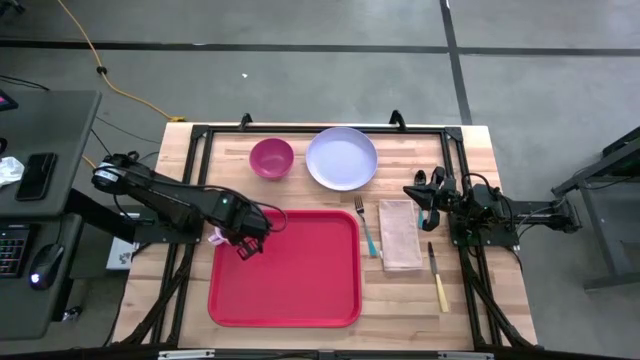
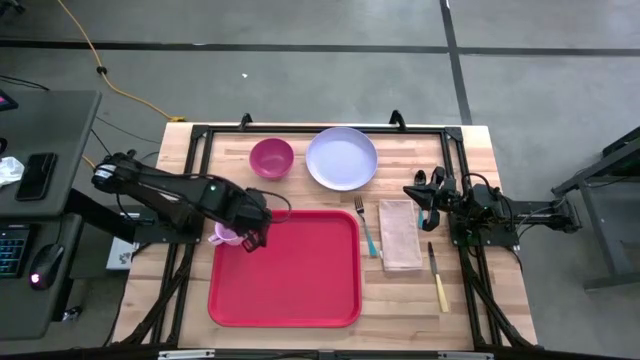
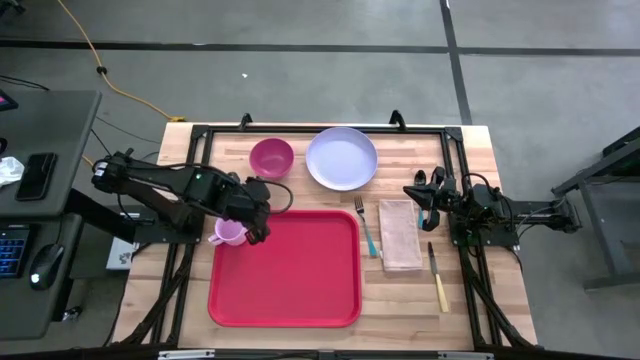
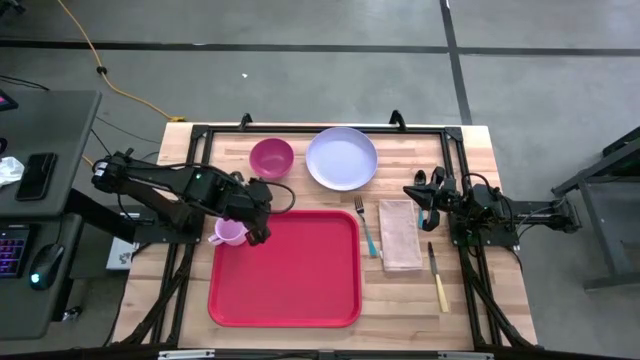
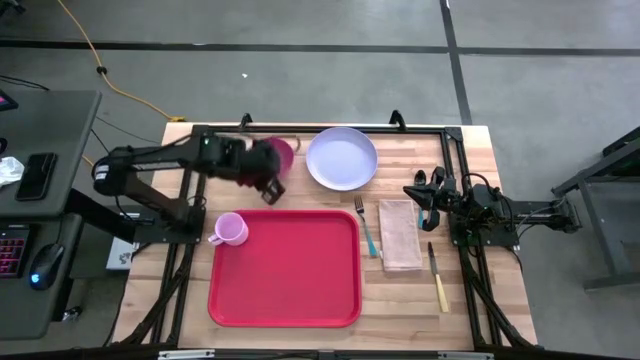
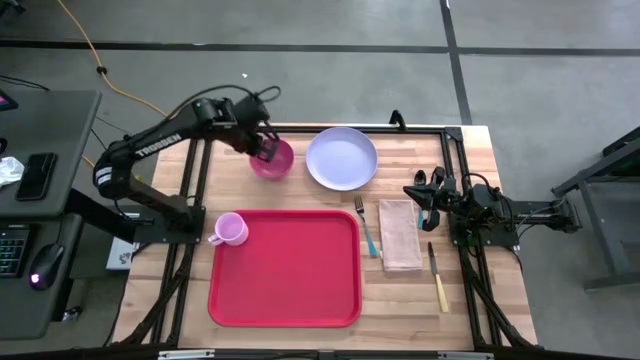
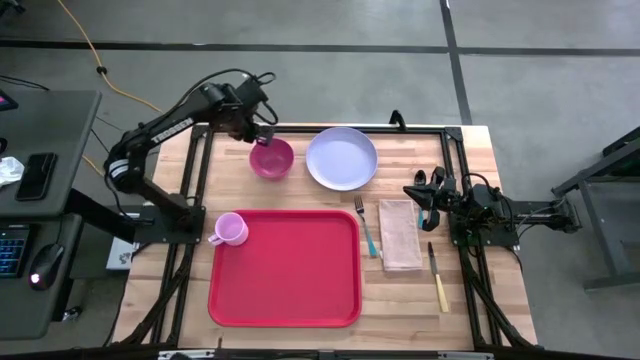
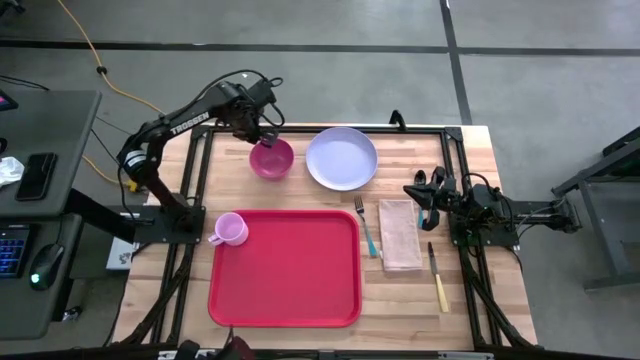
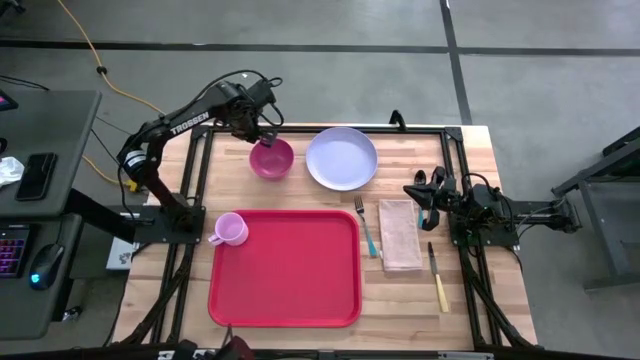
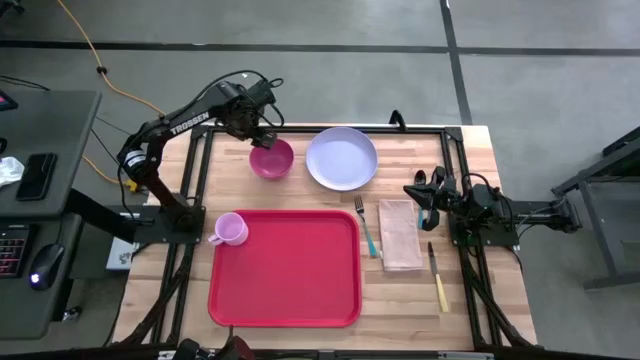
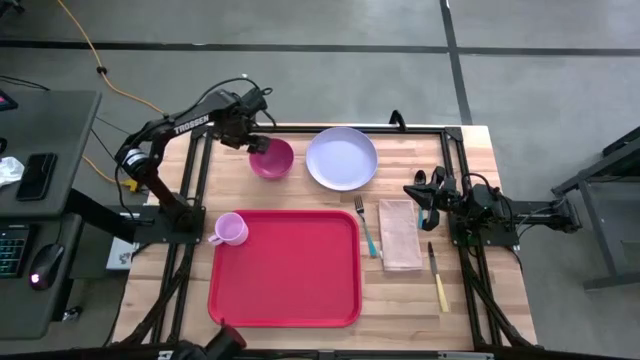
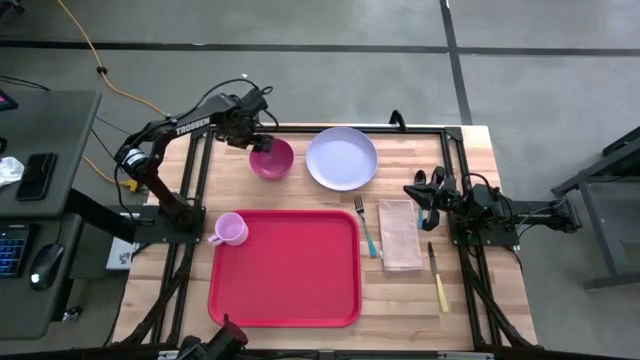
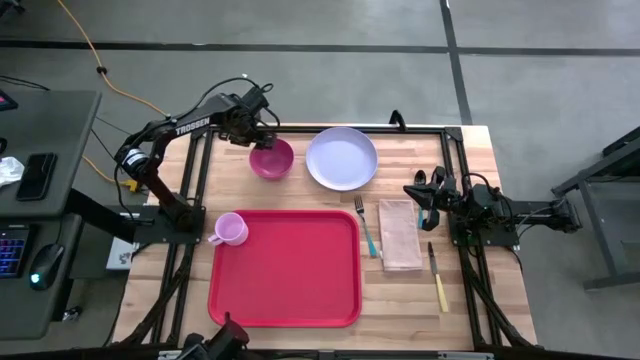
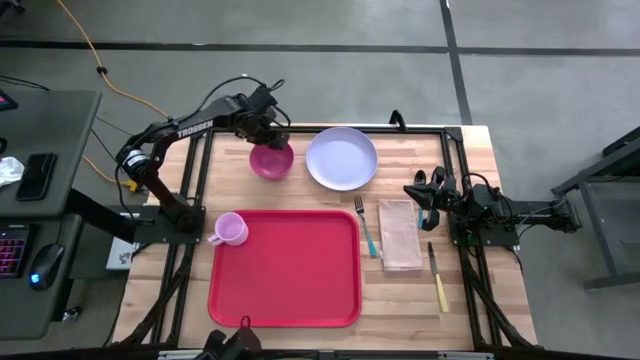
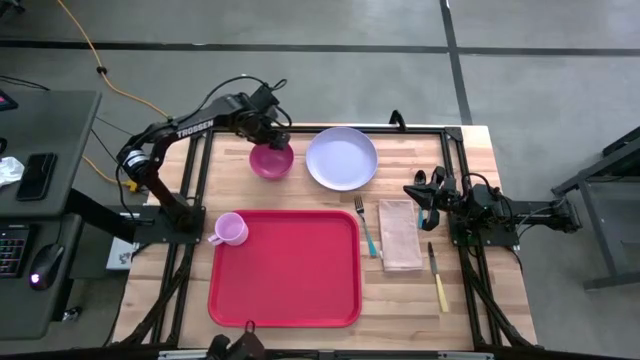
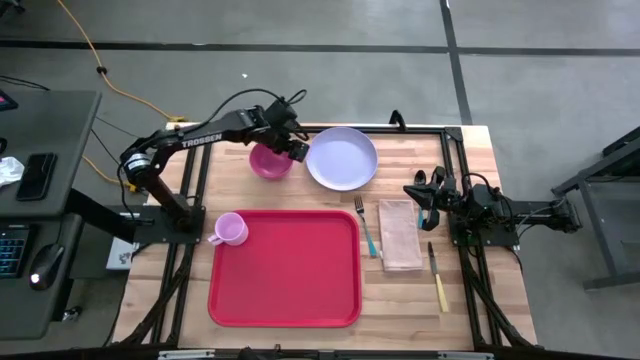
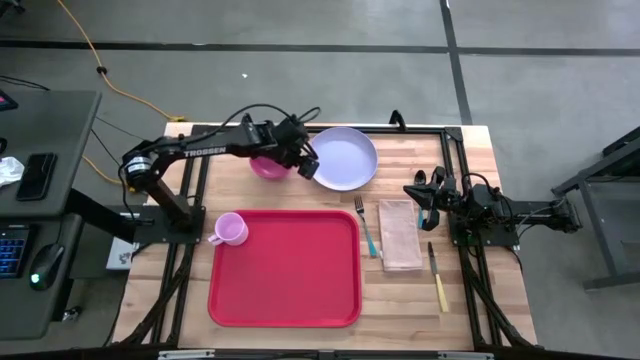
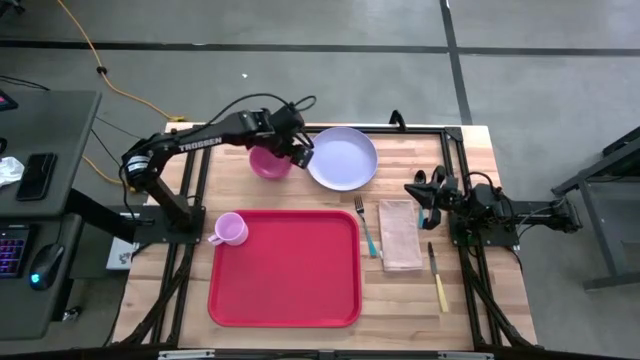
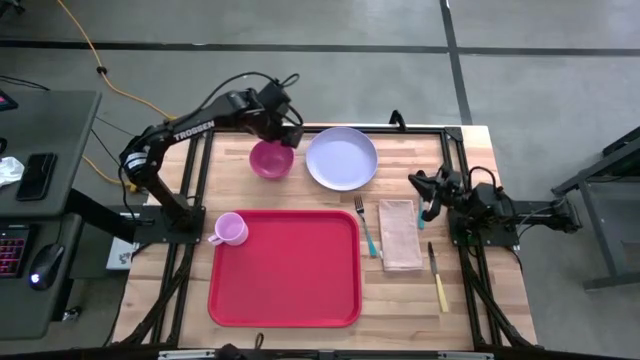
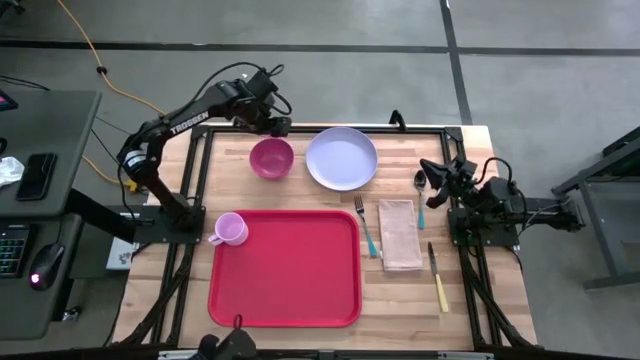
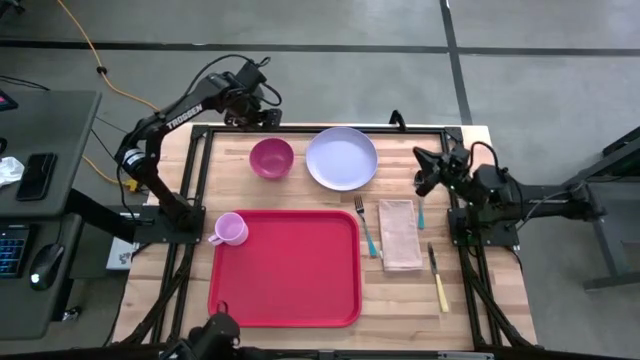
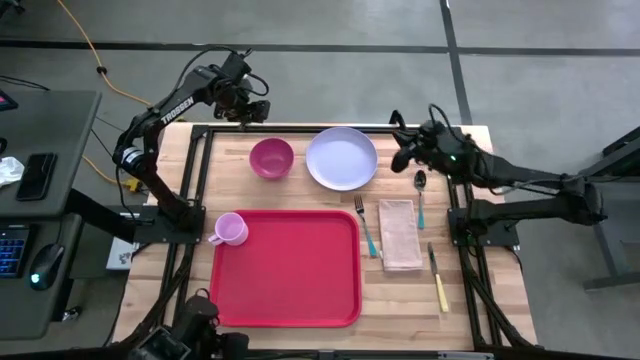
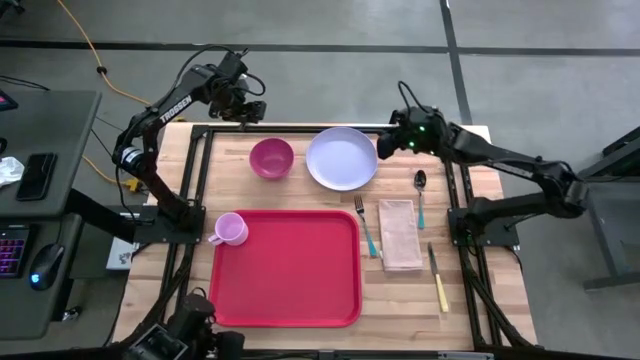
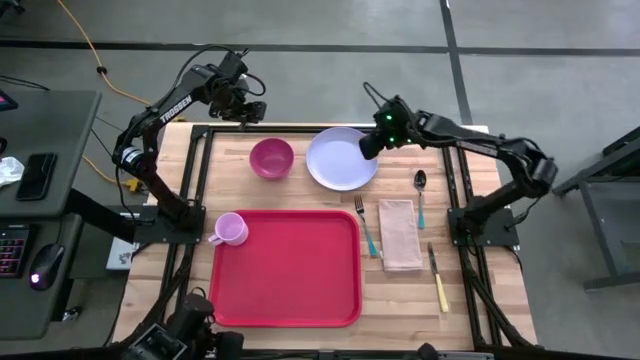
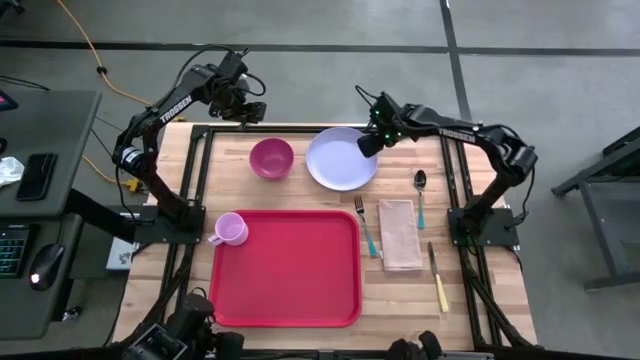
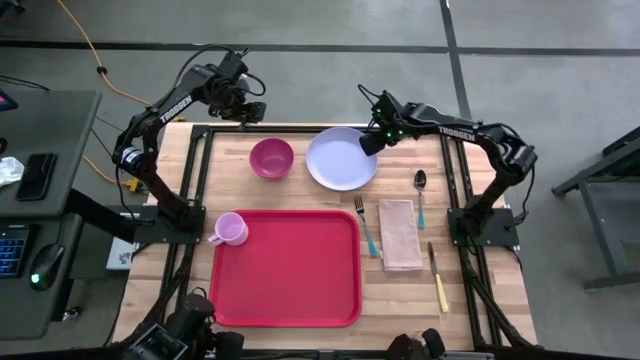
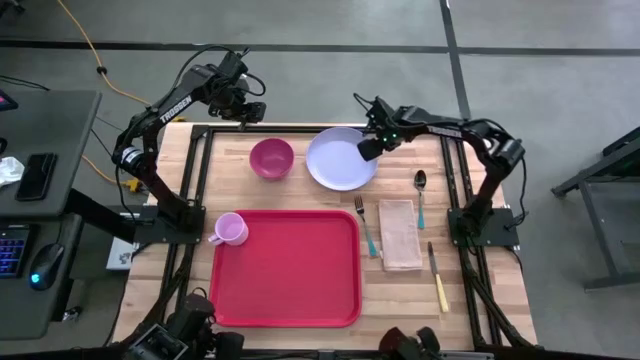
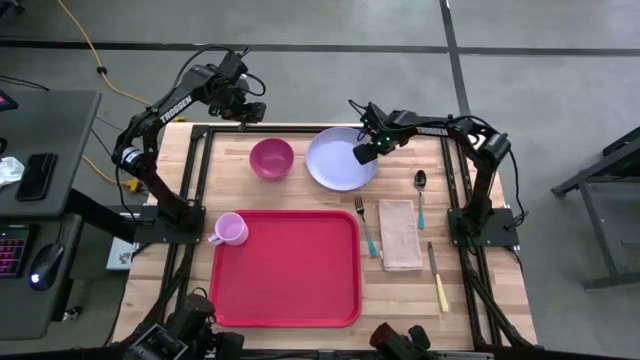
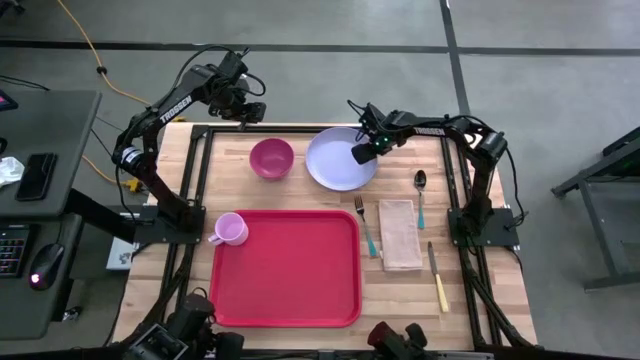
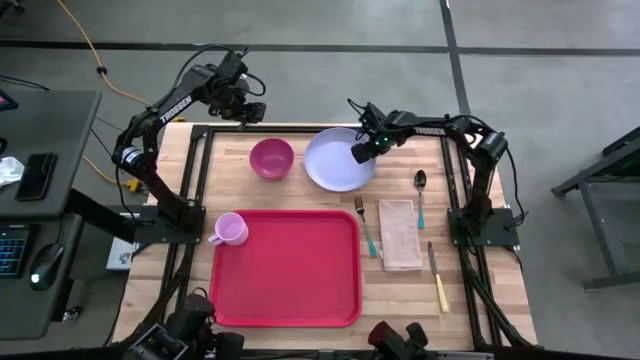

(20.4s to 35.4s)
Task: Set up tray
Put the white plate to the bottom of the purple mug on the red tray

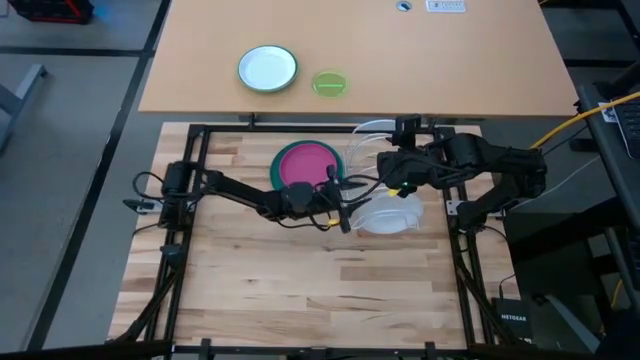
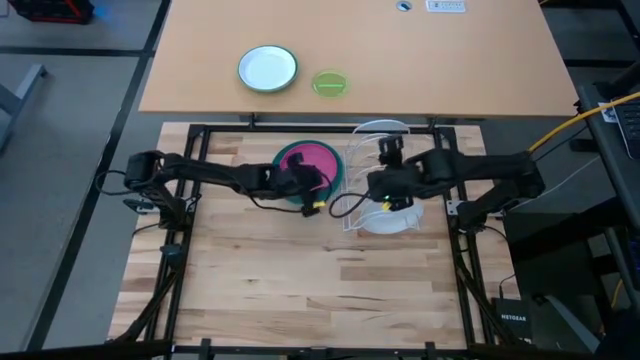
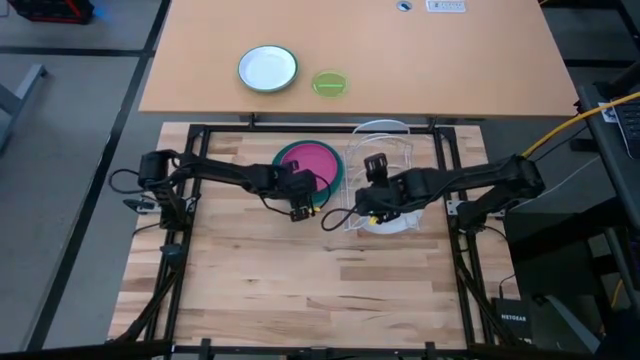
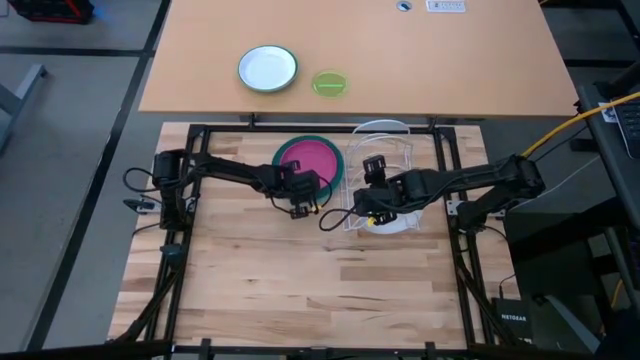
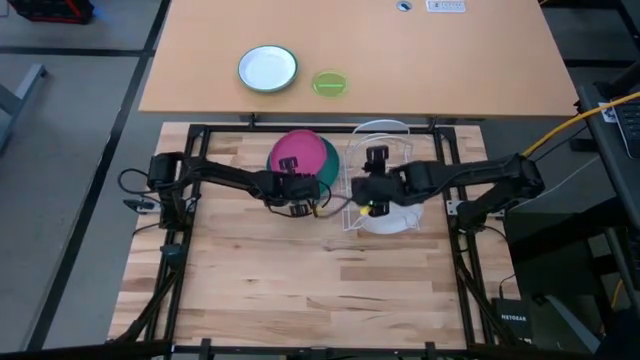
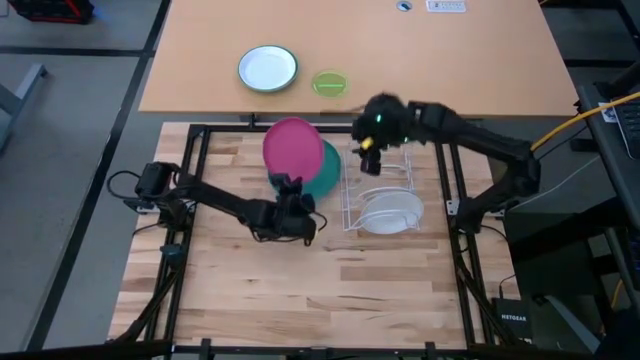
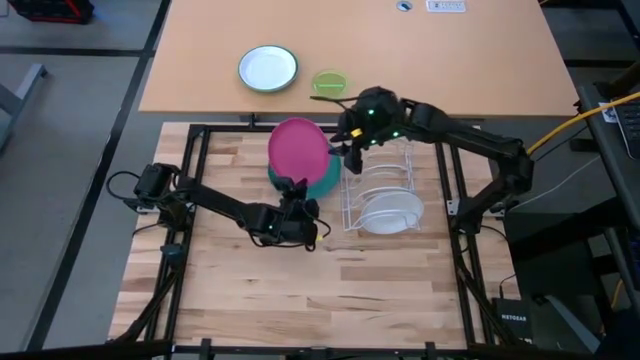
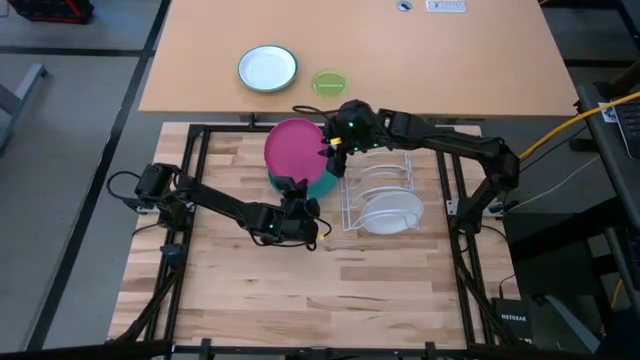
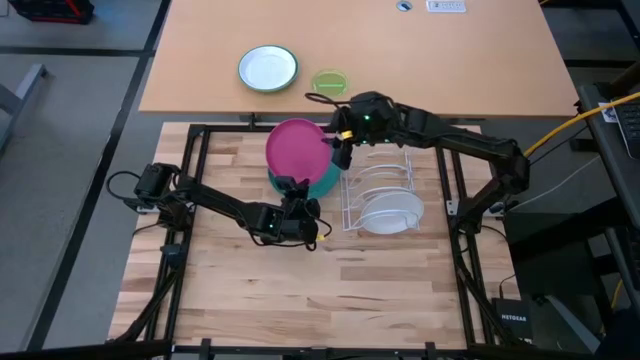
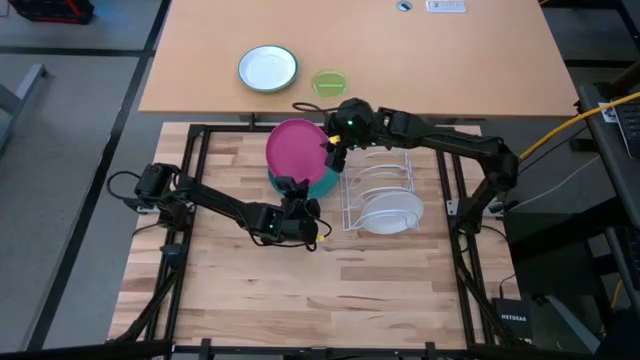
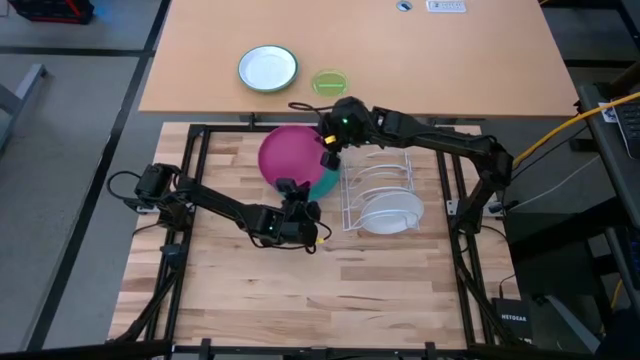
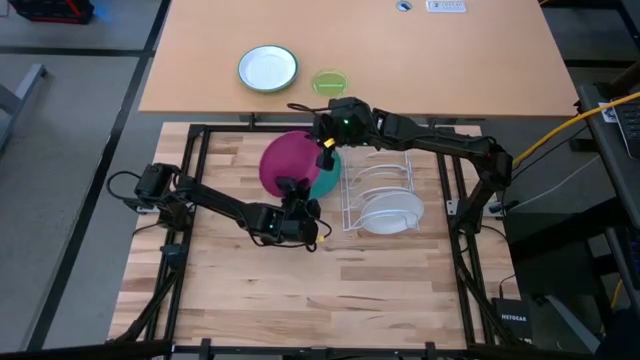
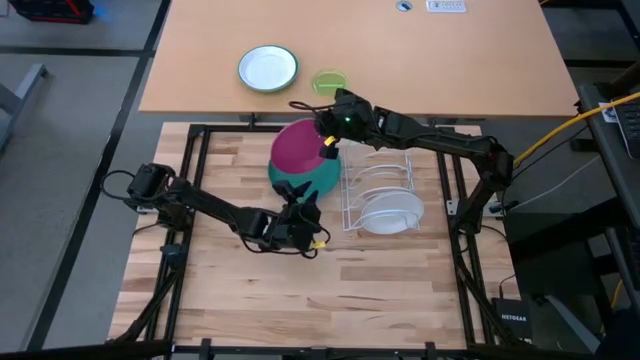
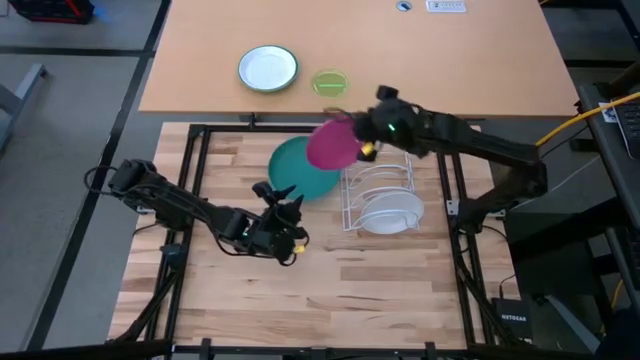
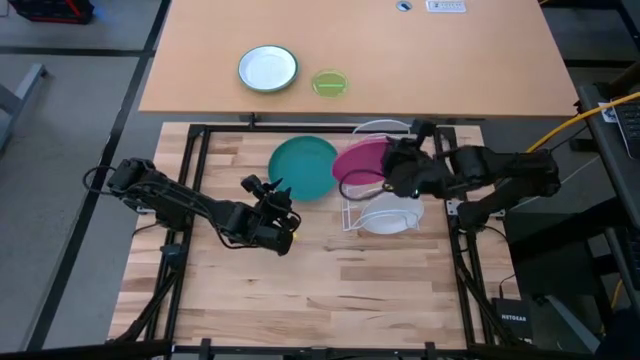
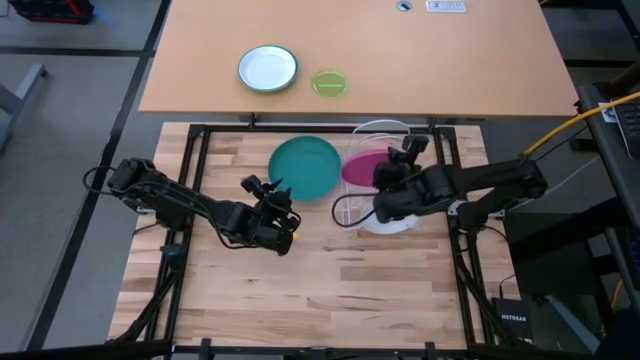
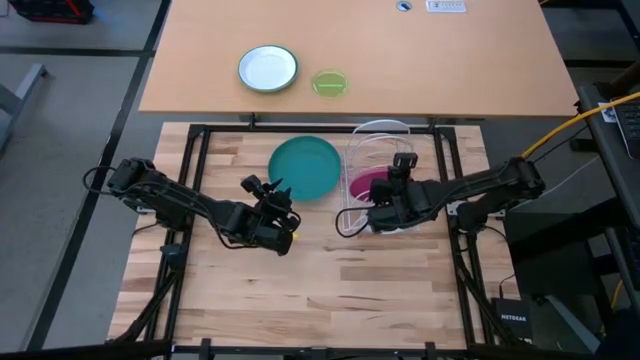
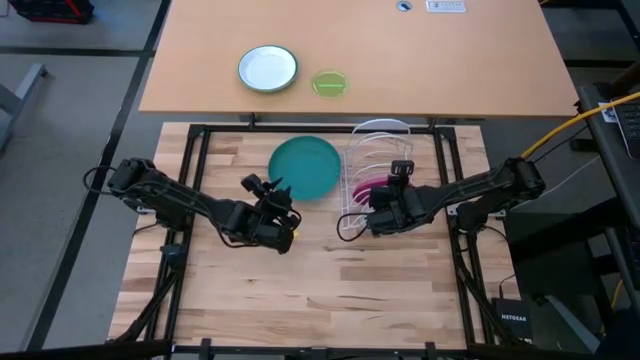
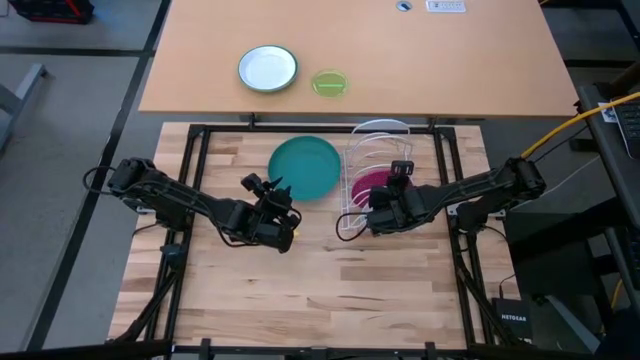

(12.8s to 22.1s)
Task: Sort dishes
Put the pink plate in the dish rack
